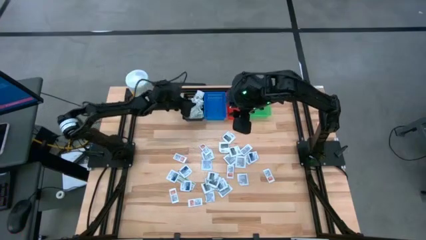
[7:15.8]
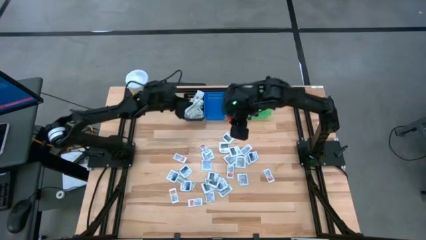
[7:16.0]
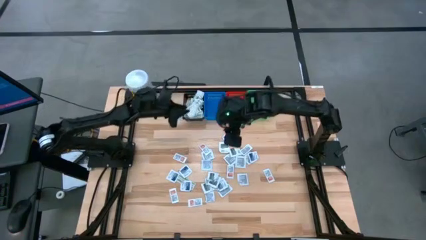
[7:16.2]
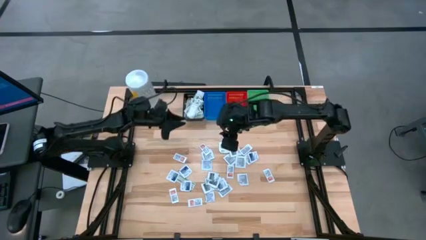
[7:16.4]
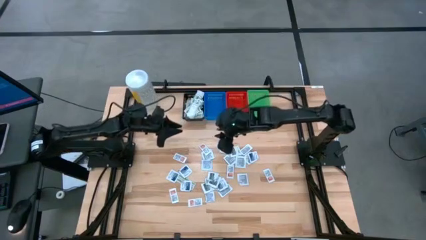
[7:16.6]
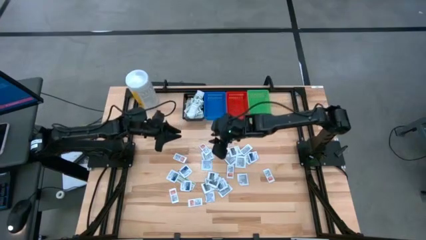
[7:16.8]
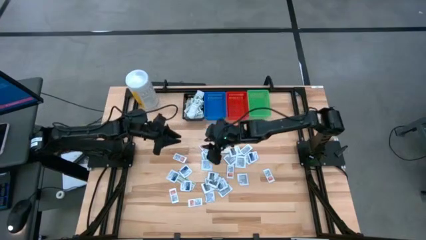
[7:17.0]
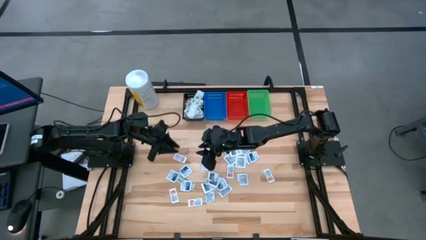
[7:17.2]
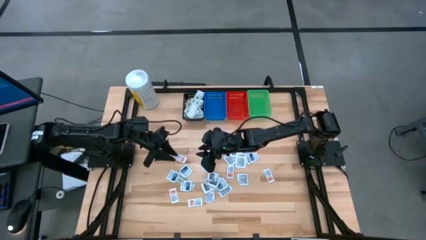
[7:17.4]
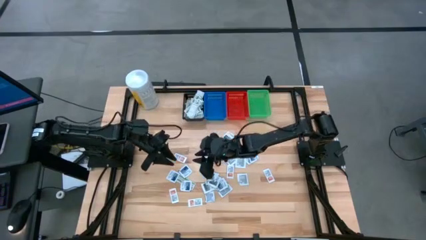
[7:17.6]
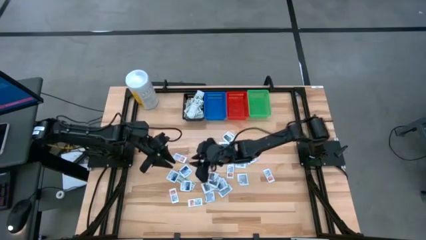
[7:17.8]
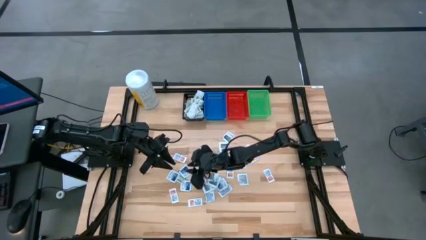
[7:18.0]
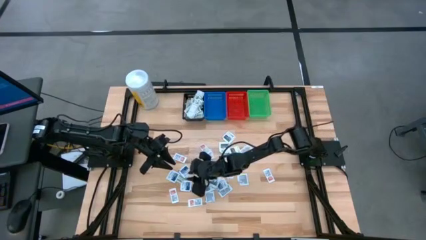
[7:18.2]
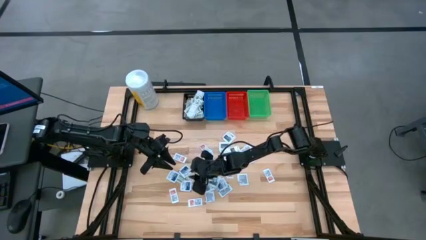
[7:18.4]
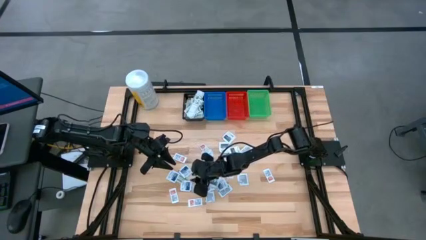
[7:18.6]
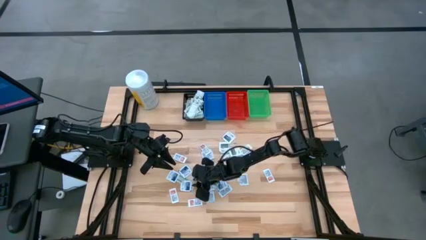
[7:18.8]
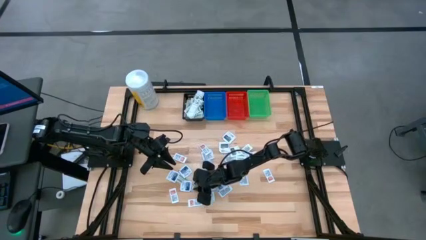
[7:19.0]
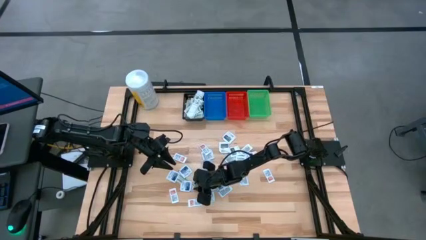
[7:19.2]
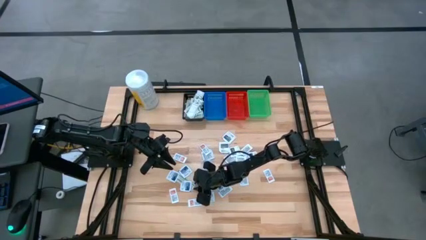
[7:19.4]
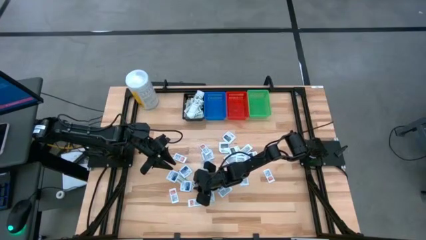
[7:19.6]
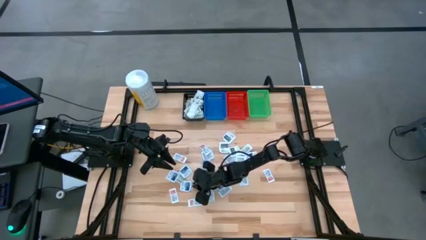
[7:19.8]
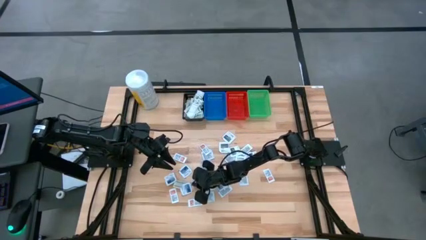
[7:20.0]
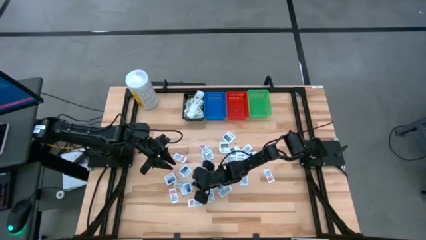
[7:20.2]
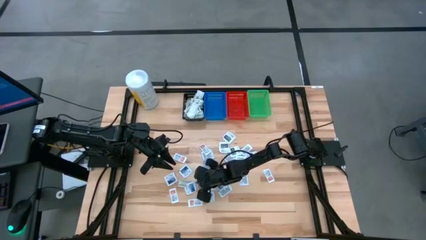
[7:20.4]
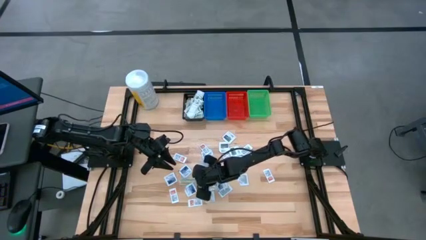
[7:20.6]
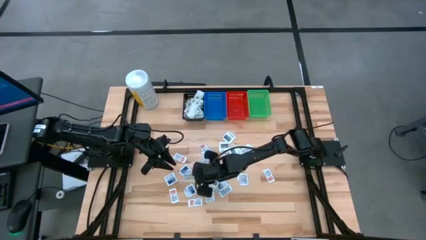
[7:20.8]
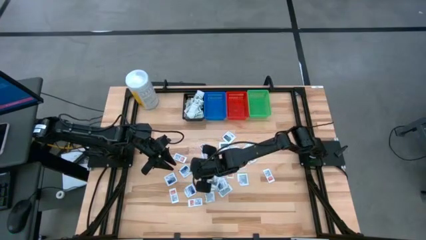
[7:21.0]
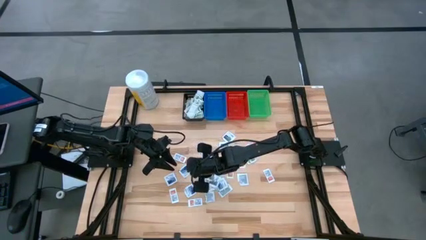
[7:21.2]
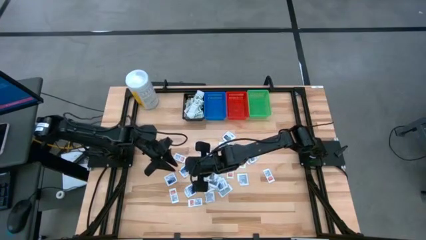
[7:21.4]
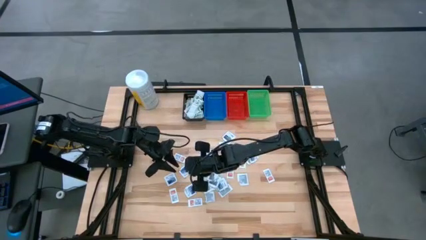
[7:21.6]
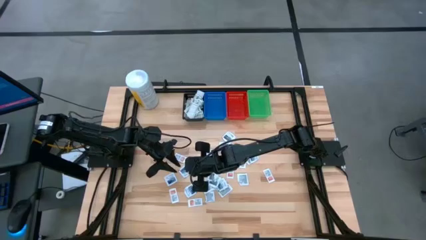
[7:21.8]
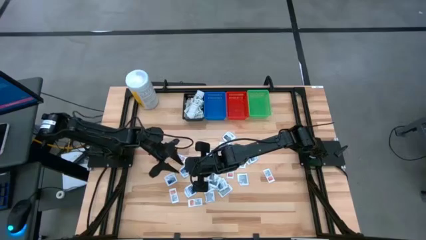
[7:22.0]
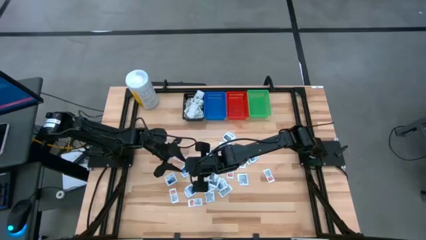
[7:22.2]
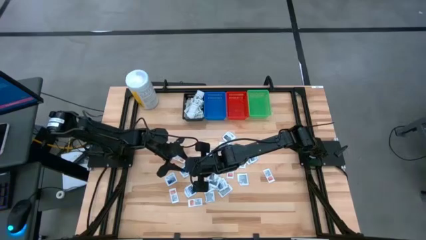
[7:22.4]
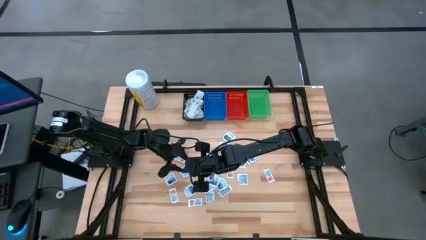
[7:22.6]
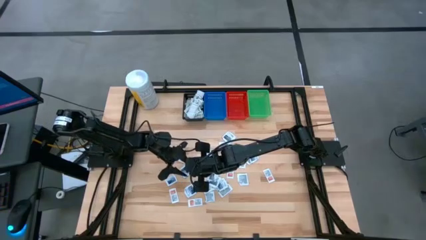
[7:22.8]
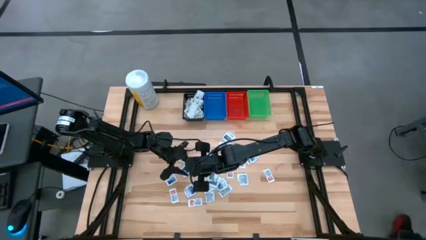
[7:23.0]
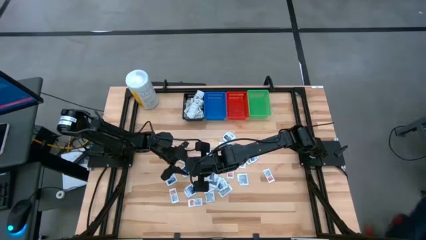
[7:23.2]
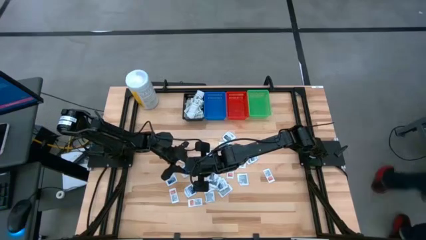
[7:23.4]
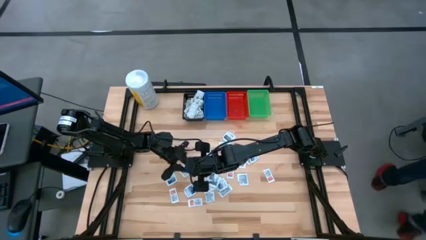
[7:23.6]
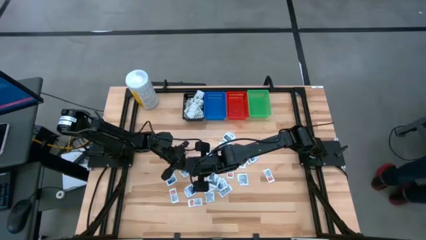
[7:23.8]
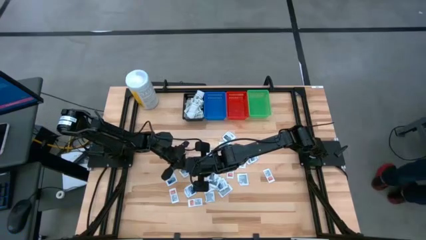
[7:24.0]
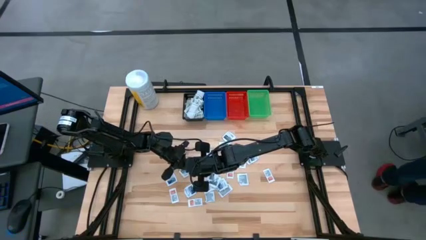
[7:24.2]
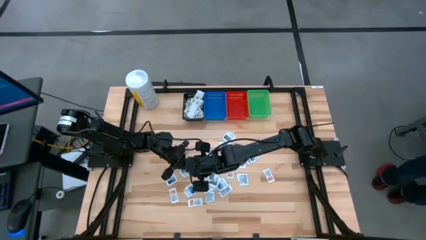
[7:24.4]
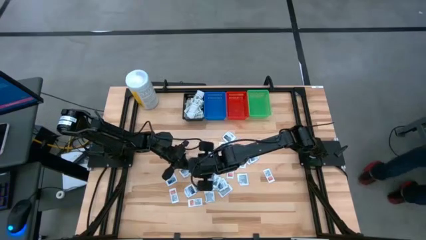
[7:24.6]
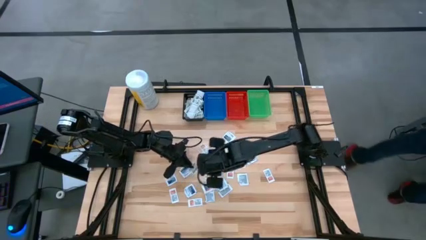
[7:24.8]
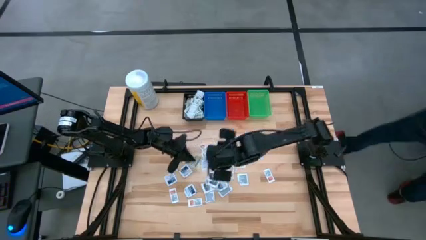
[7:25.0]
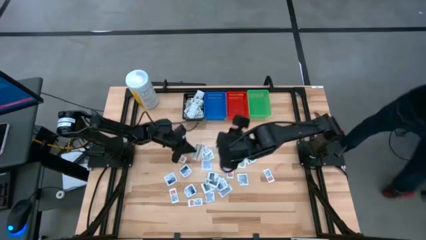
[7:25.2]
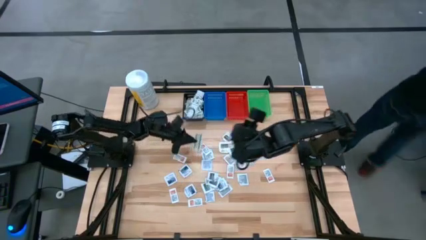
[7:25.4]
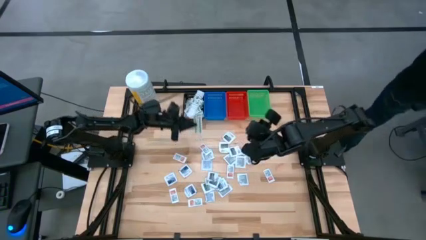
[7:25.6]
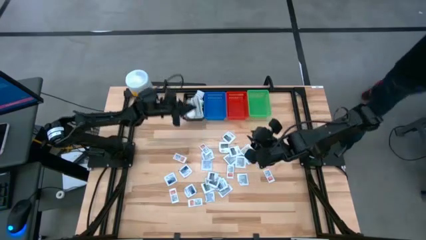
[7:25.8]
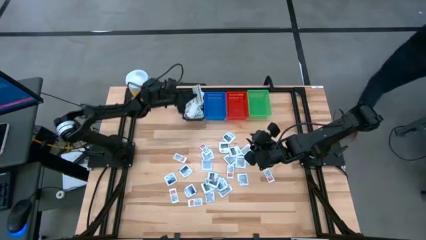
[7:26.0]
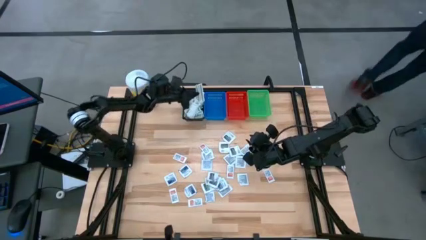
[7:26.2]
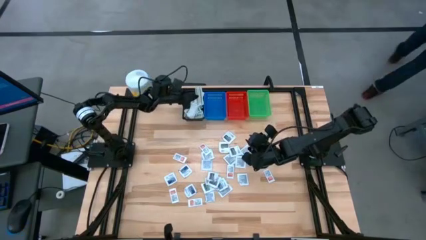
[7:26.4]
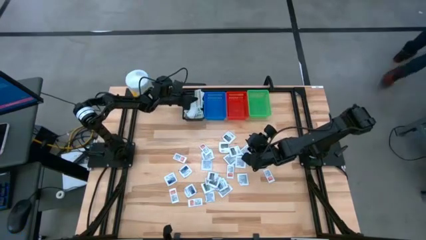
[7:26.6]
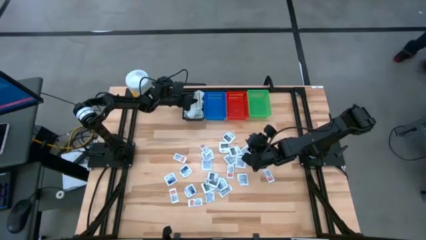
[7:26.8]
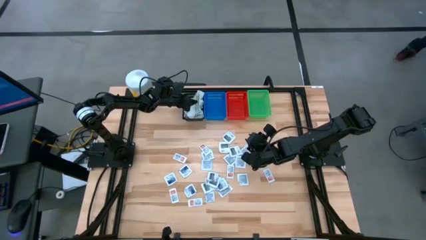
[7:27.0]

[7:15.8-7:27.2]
Task: Pick & Place First Aid Supplies
Put the green bandage pack in the black bin
